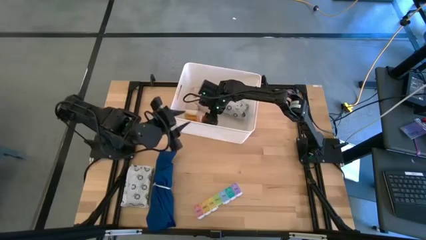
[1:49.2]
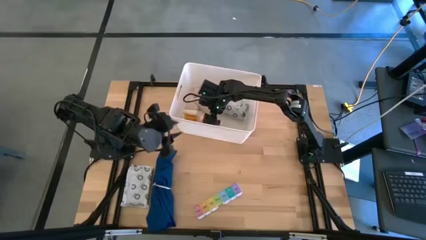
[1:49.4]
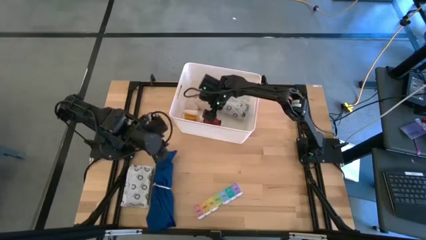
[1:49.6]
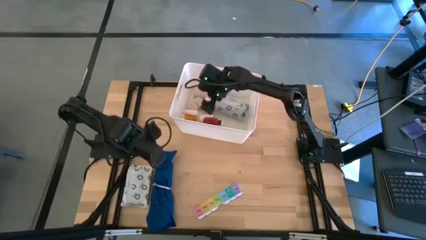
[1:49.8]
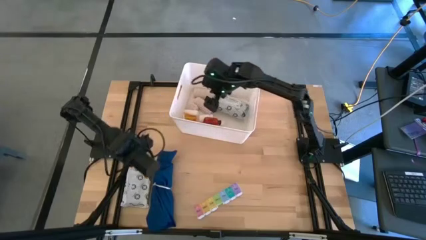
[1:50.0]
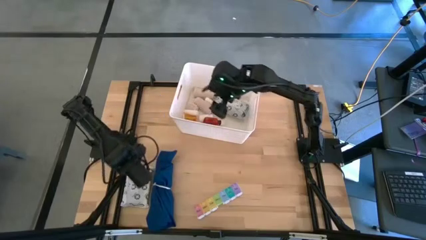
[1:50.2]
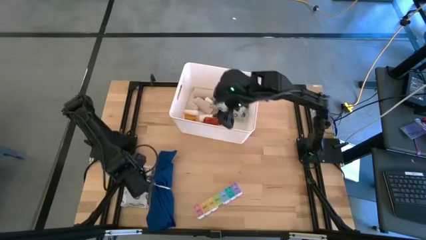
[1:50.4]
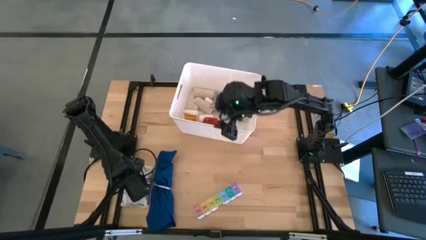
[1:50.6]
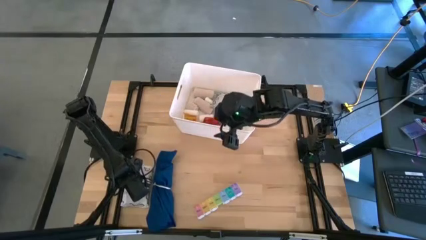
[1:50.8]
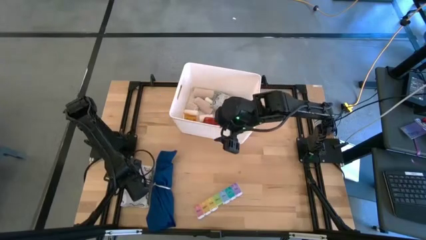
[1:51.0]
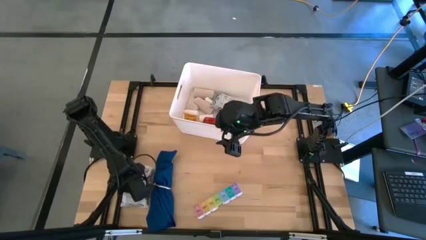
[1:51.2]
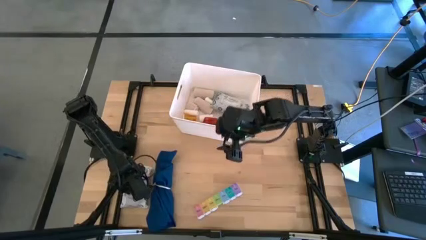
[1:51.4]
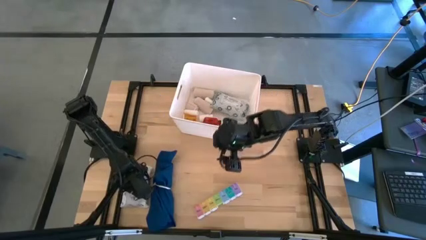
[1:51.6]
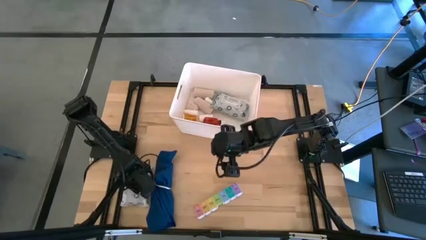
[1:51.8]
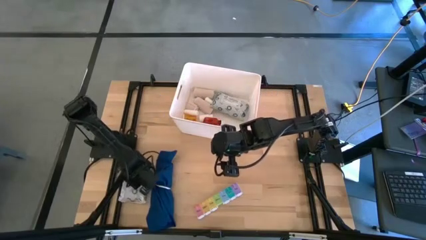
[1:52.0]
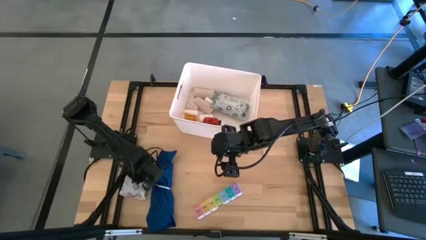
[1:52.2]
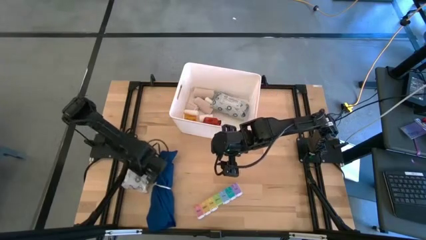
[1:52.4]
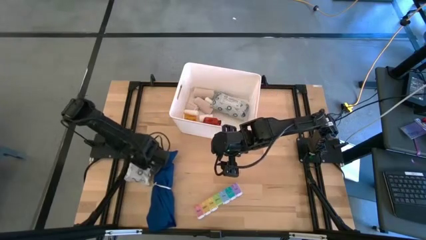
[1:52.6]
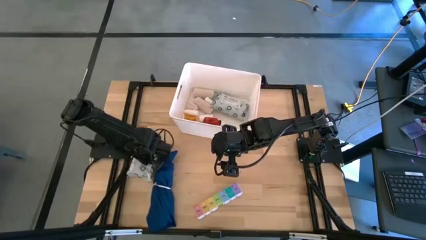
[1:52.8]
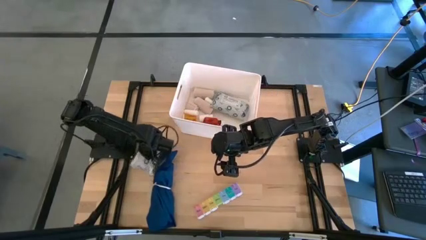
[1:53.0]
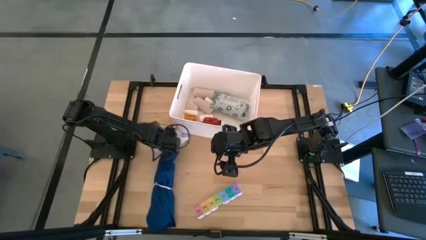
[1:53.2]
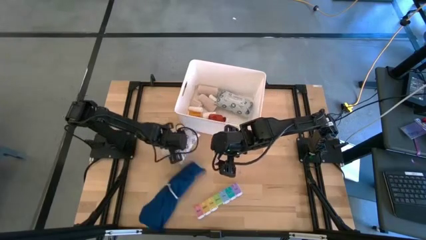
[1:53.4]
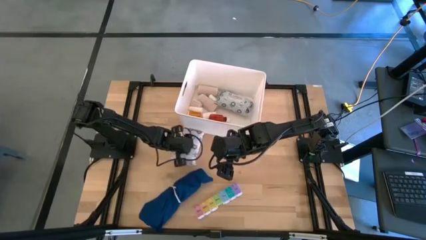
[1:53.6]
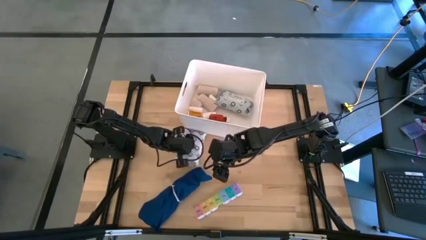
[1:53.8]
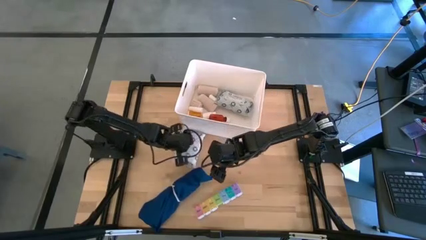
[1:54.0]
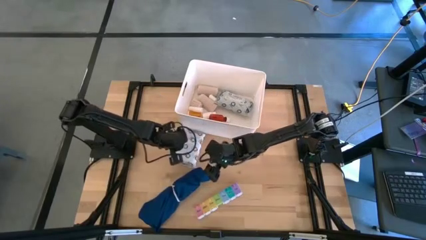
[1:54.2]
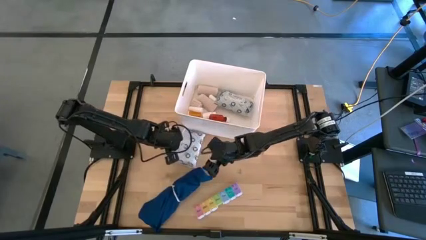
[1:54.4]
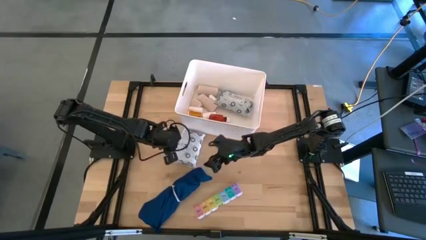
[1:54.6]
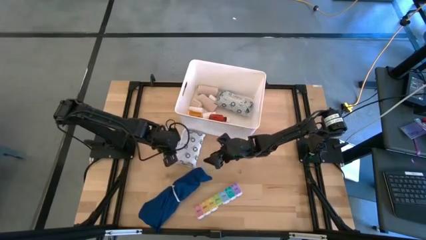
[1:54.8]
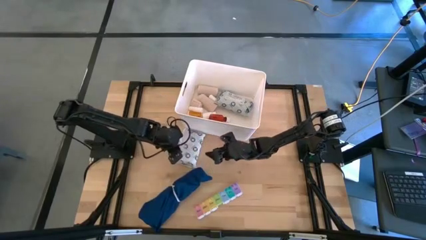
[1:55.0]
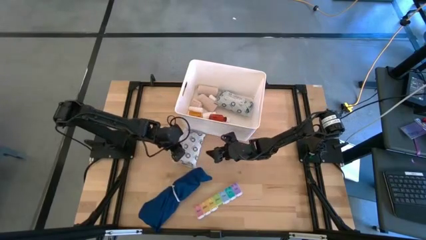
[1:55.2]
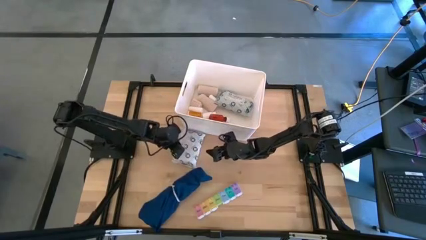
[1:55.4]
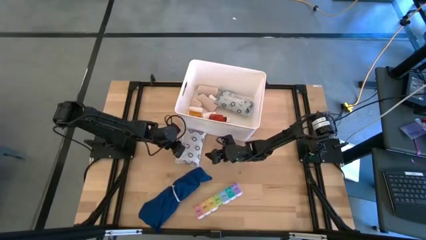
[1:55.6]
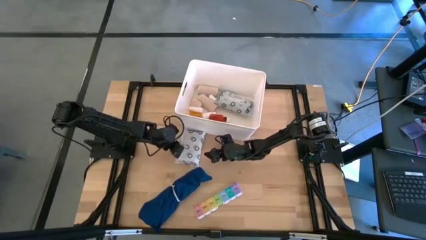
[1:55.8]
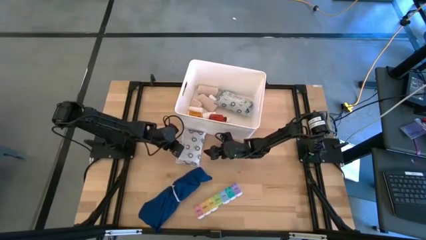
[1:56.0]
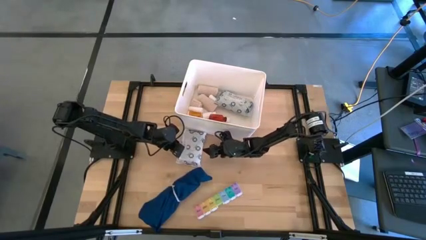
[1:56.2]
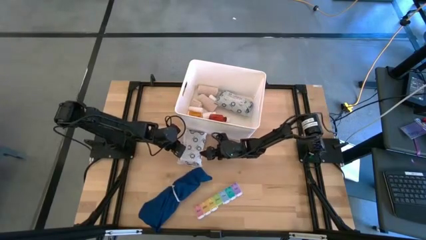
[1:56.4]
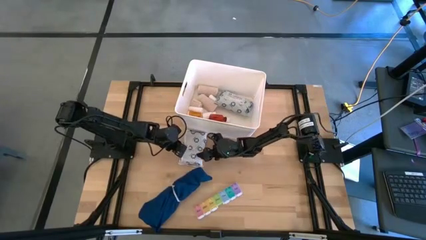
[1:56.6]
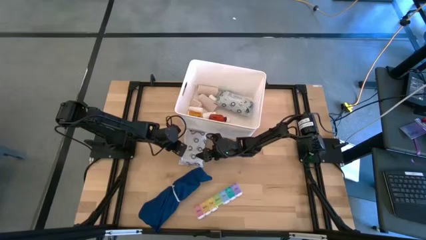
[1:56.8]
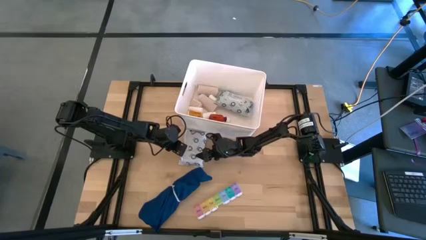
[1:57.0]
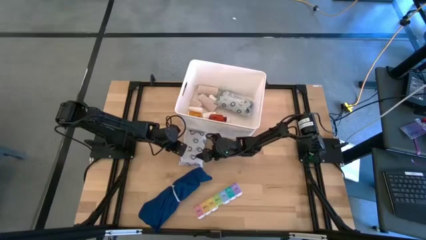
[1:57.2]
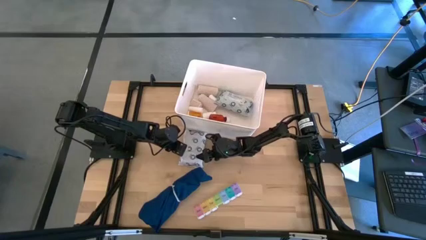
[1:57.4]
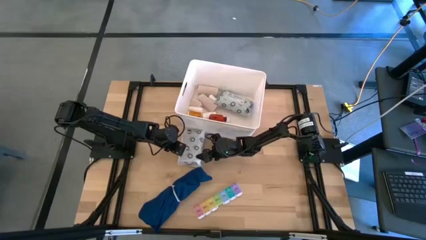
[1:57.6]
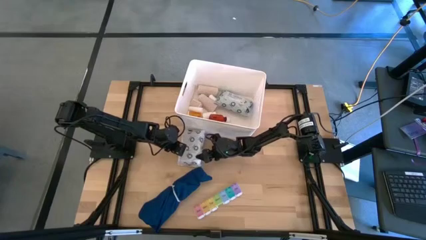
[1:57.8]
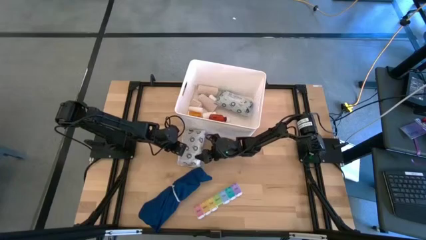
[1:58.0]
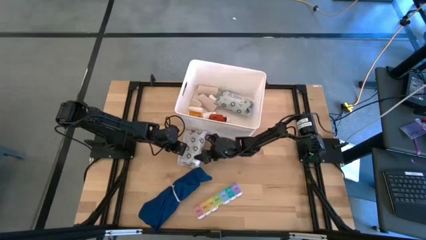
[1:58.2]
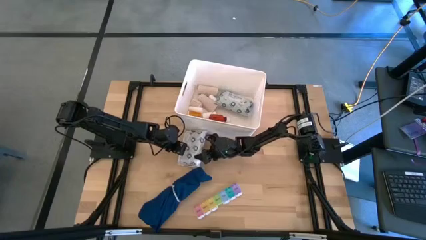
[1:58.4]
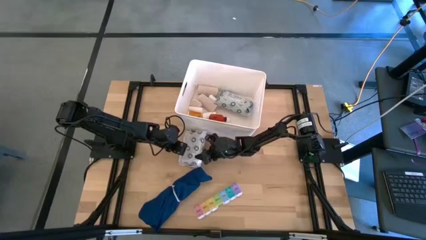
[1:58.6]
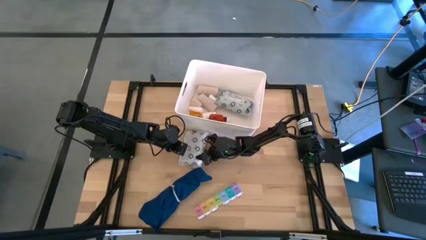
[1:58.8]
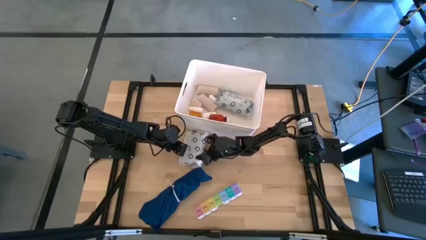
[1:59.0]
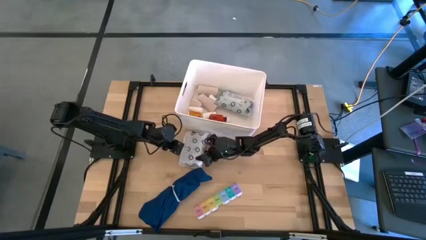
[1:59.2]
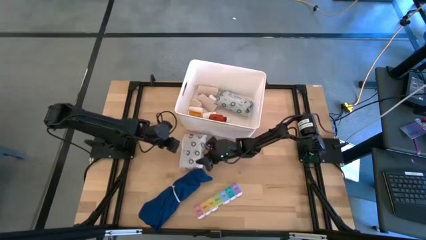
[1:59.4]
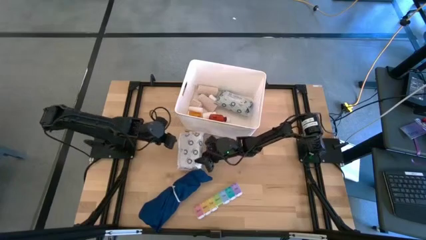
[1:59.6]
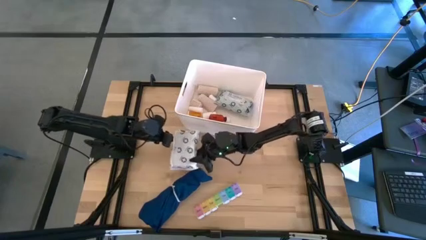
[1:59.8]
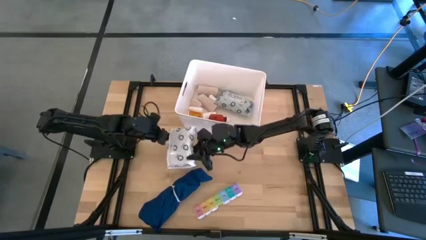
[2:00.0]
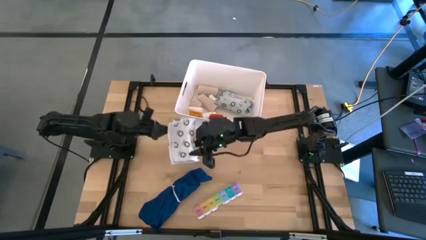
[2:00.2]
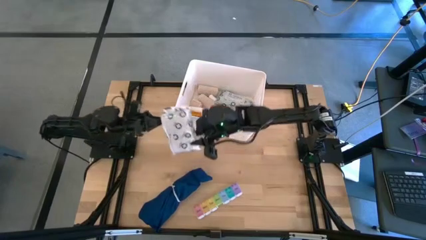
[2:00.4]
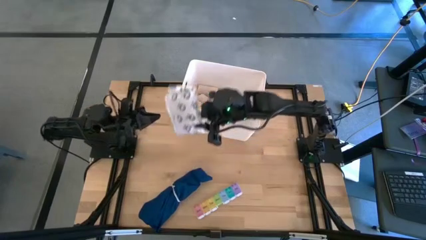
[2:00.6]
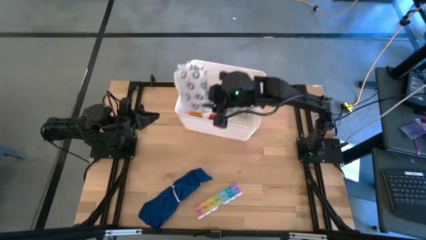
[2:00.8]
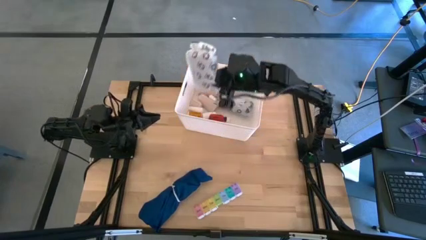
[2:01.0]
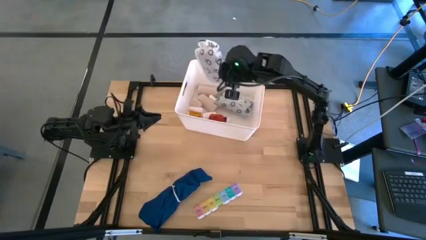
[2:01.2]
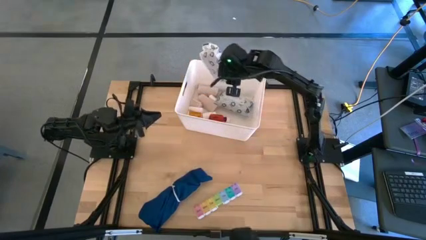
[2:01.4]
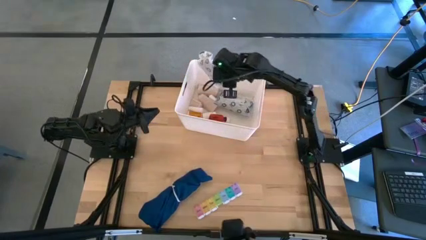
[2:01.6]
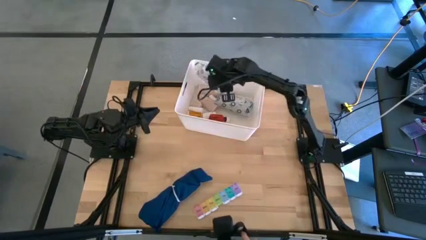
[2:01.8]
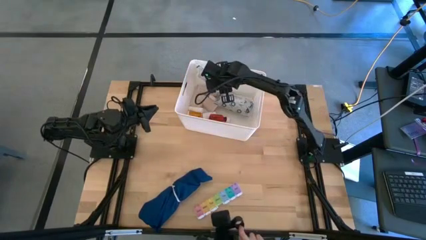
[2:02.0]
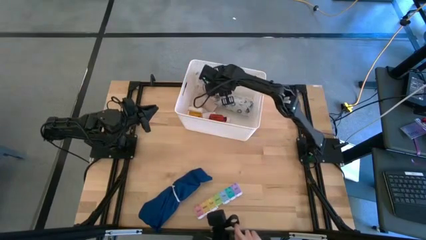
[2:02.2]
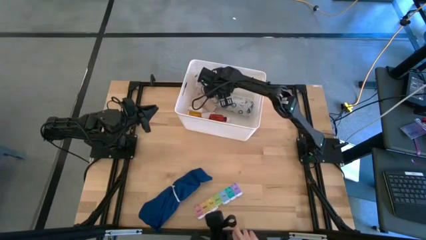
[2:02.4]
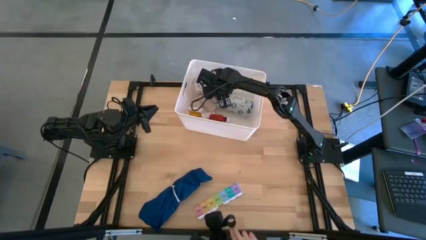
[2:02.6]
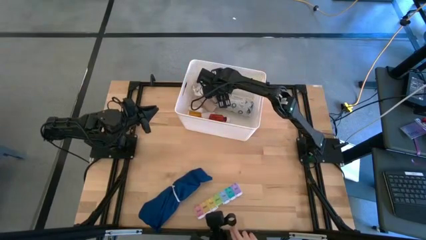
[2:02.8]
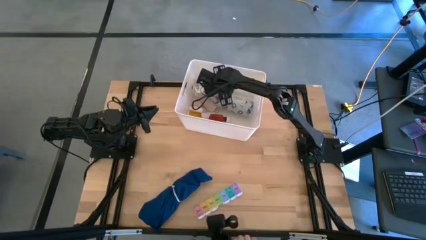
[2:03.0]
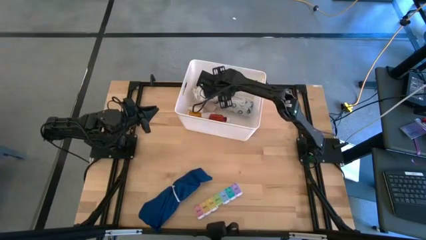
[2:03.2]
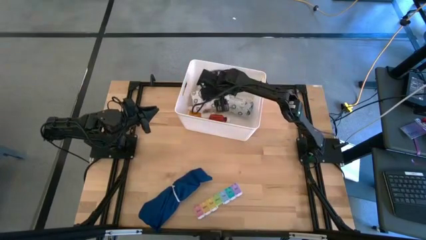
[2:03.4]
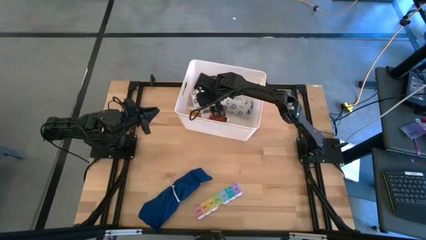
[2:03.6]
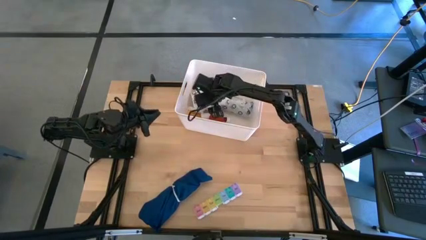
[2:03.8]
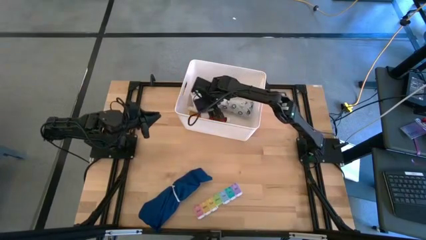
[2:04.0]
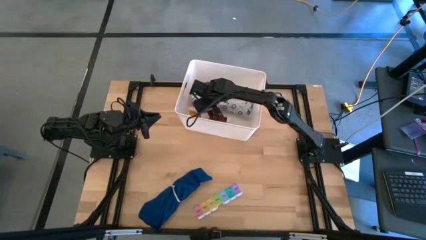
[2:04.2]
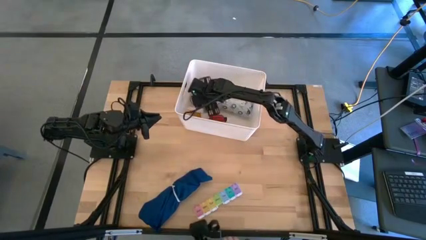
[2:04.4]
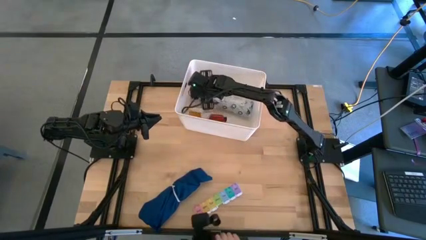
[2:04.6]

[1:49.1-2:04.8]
Task: Pick & place medical supplies in basket/bin
Put the white mailer bag into the white container
